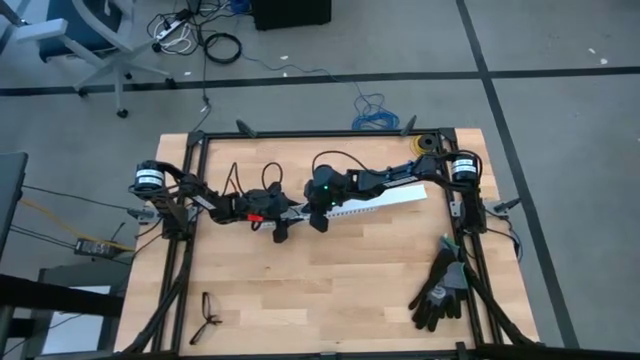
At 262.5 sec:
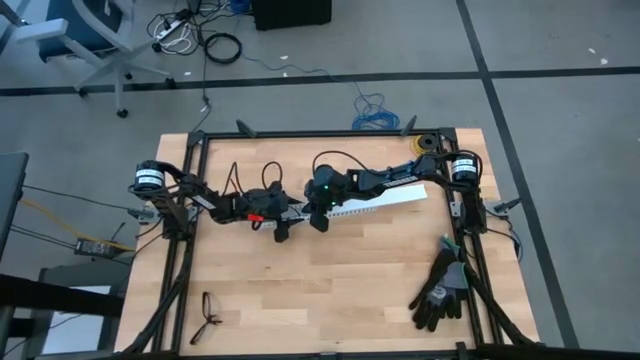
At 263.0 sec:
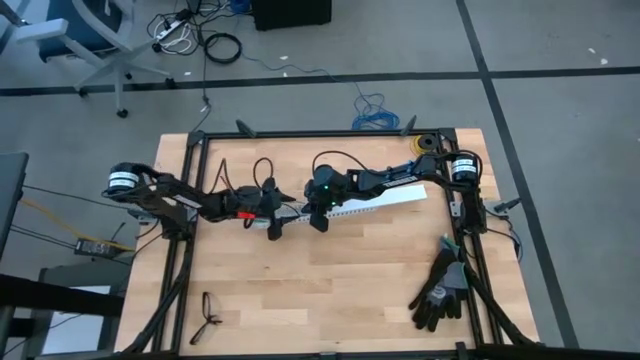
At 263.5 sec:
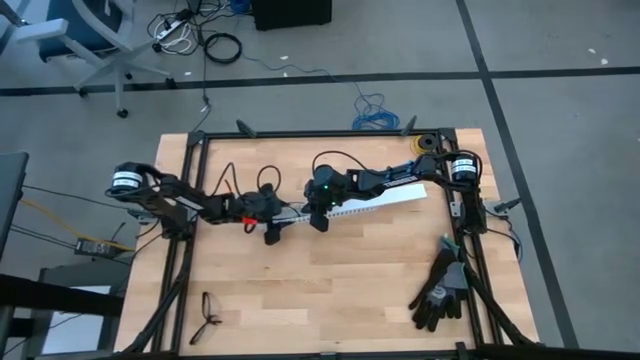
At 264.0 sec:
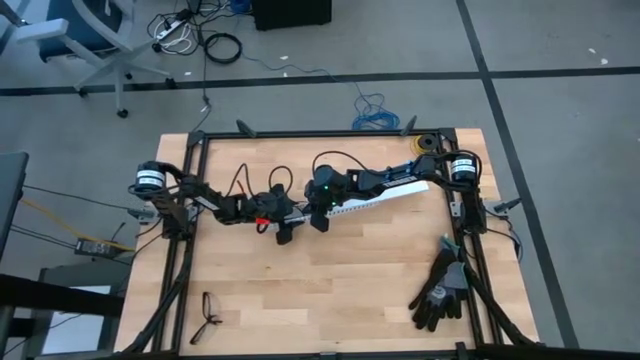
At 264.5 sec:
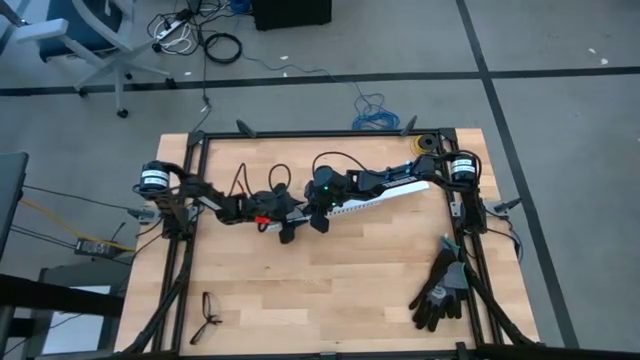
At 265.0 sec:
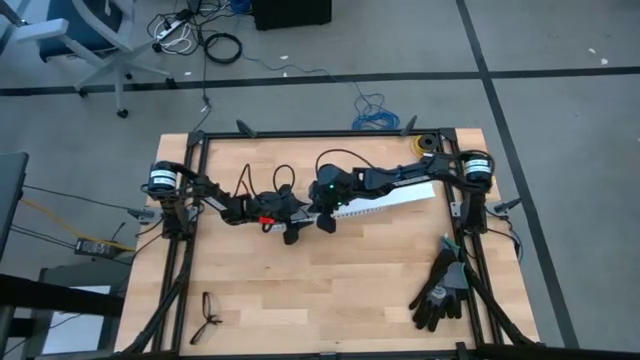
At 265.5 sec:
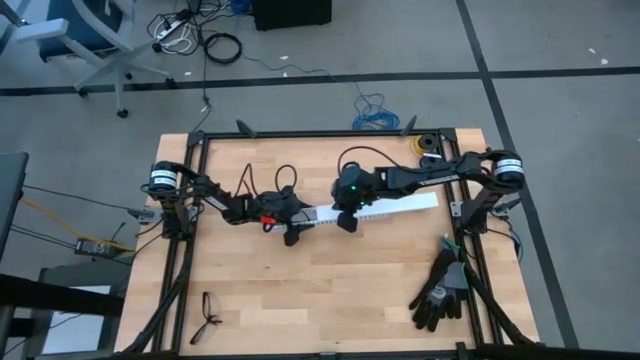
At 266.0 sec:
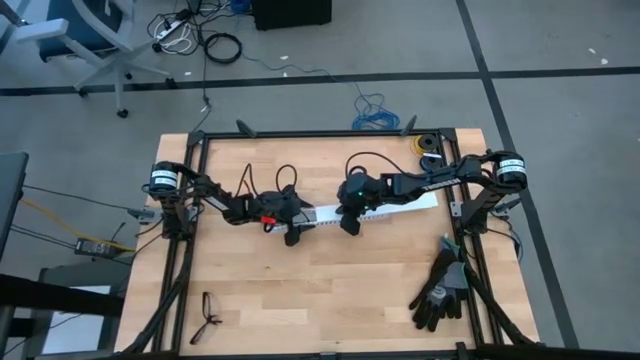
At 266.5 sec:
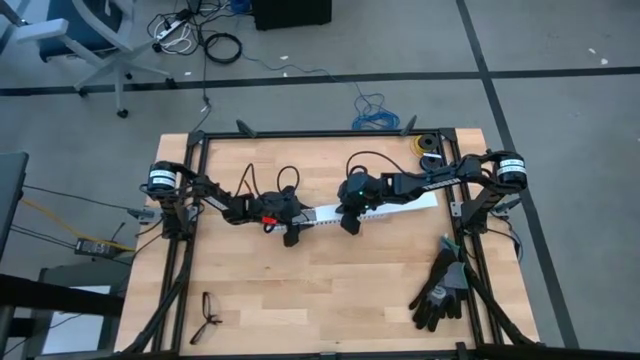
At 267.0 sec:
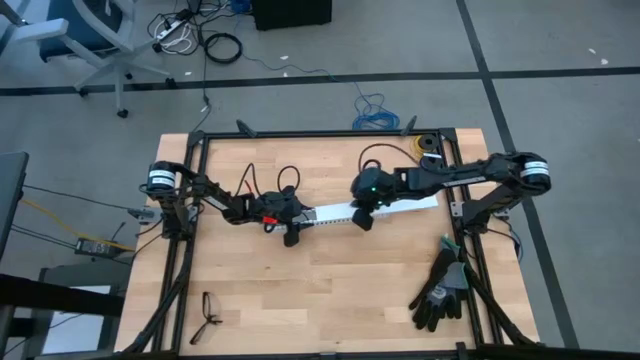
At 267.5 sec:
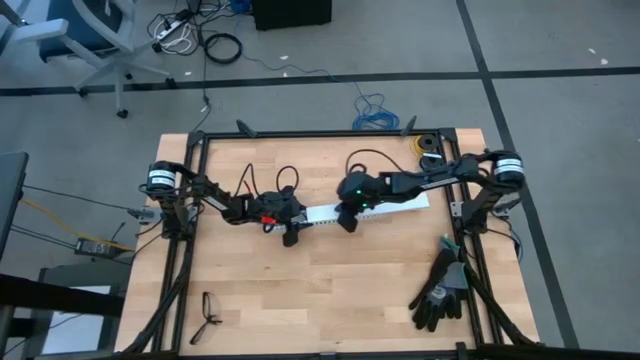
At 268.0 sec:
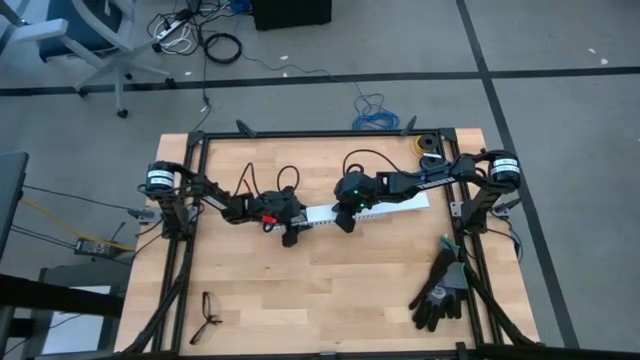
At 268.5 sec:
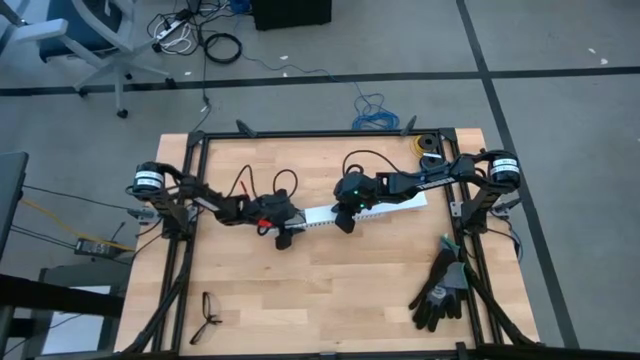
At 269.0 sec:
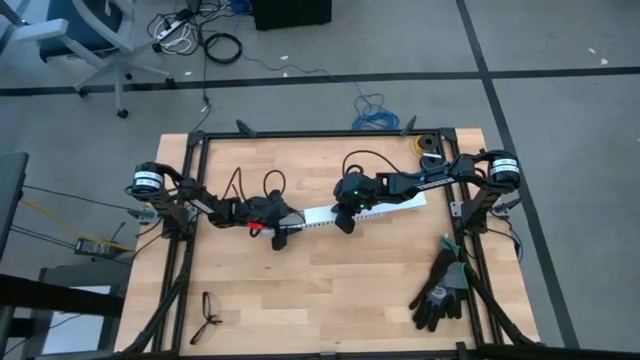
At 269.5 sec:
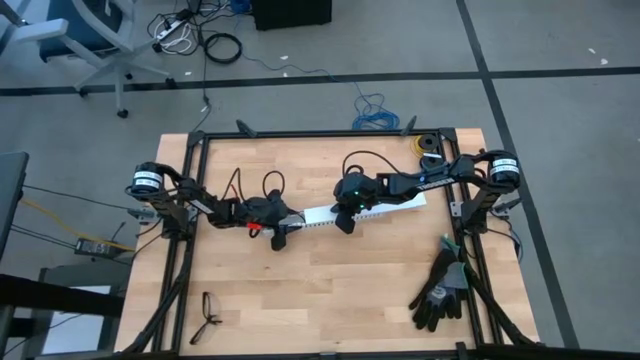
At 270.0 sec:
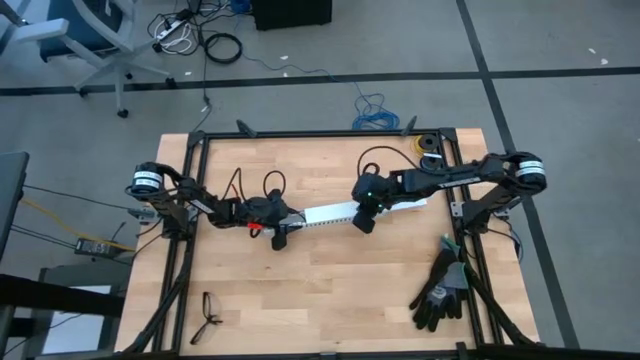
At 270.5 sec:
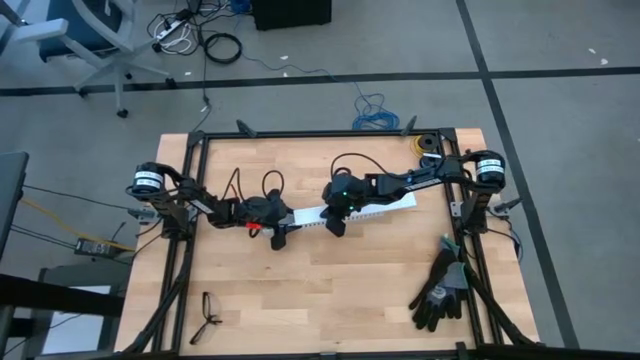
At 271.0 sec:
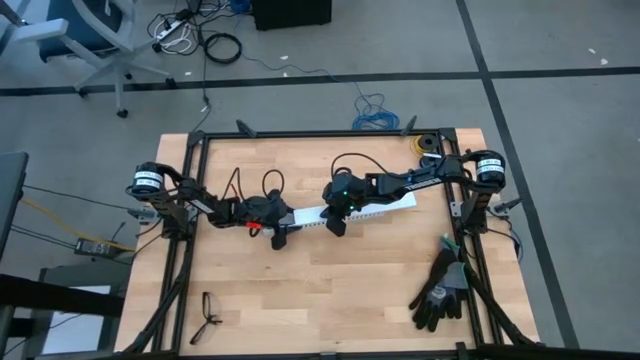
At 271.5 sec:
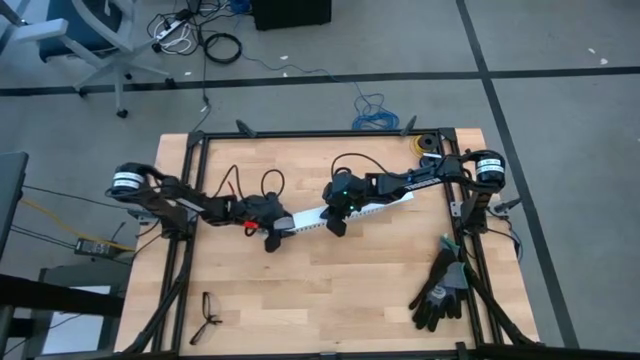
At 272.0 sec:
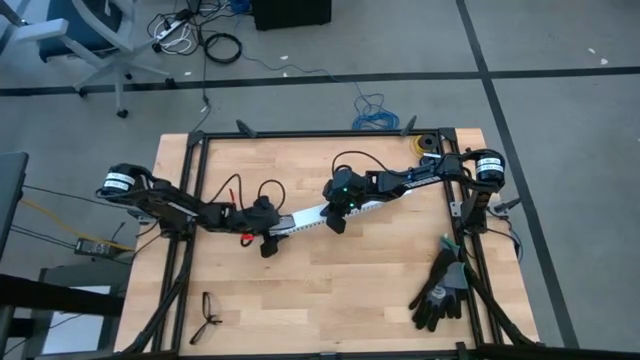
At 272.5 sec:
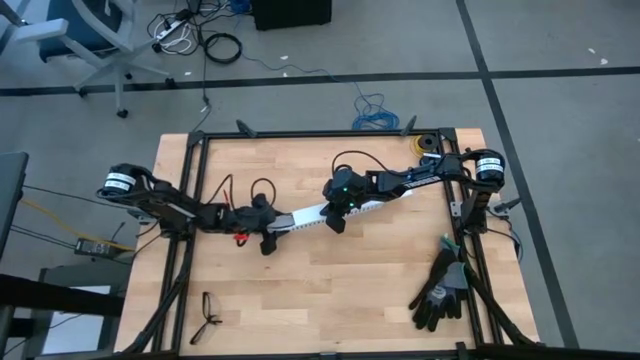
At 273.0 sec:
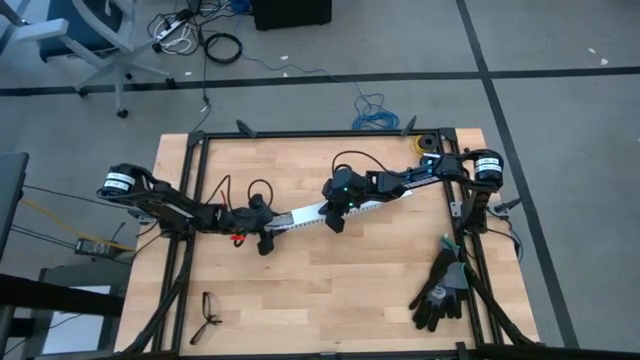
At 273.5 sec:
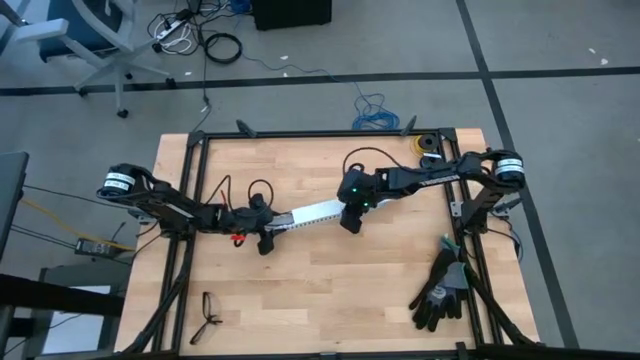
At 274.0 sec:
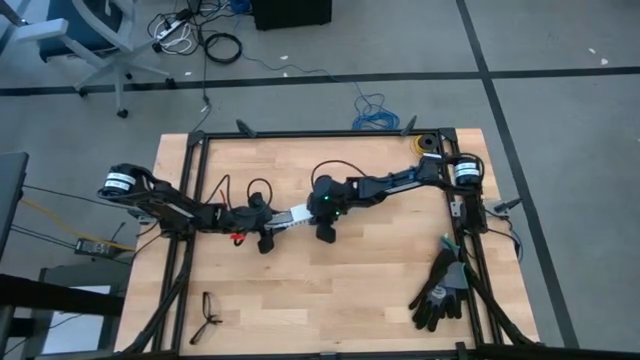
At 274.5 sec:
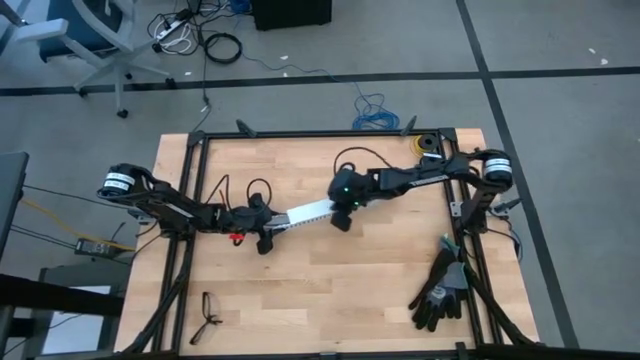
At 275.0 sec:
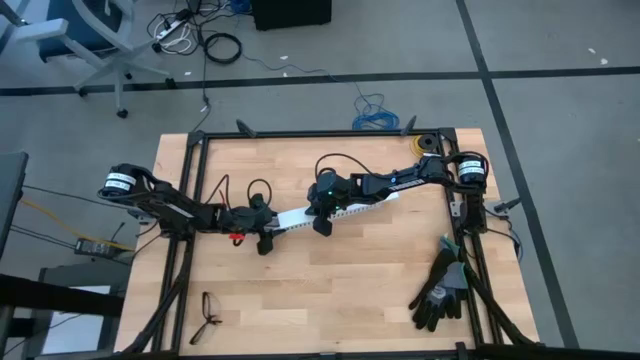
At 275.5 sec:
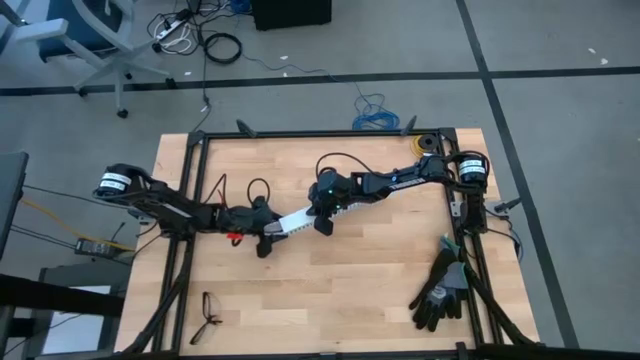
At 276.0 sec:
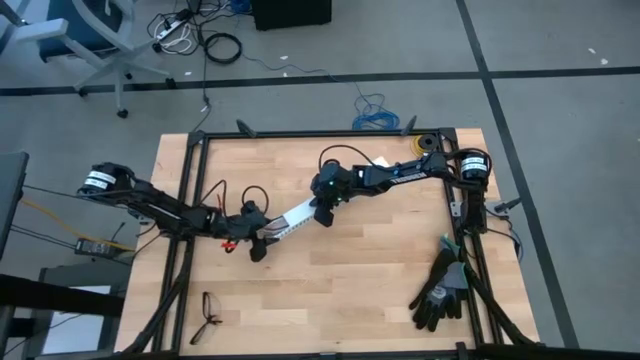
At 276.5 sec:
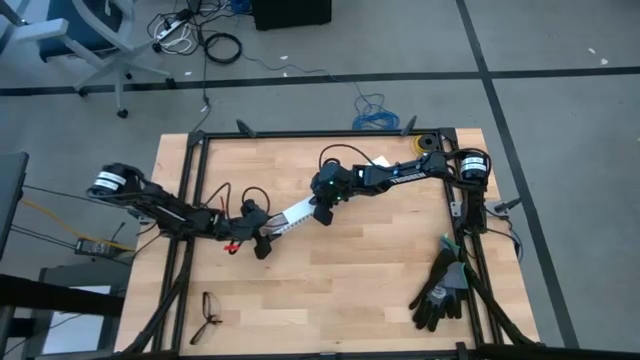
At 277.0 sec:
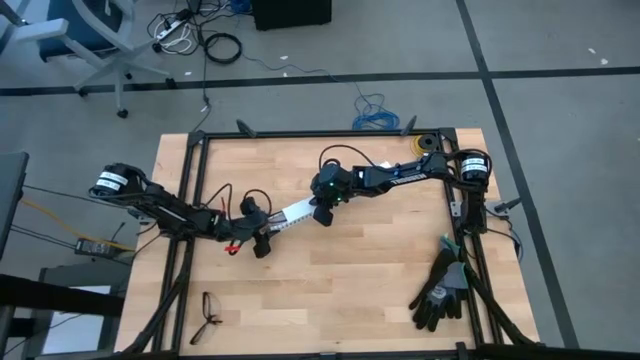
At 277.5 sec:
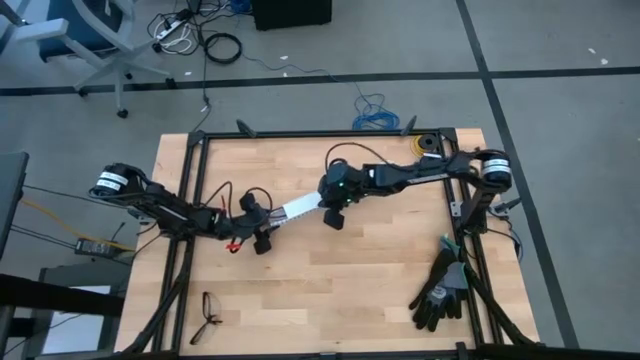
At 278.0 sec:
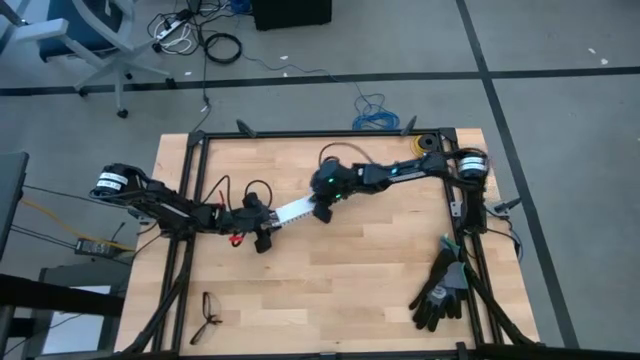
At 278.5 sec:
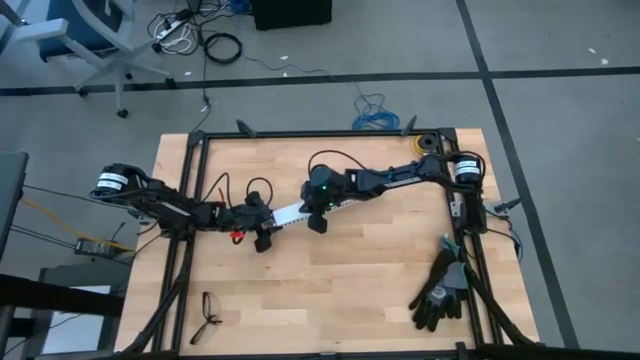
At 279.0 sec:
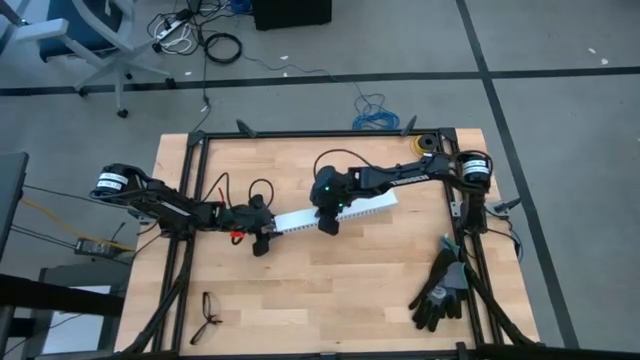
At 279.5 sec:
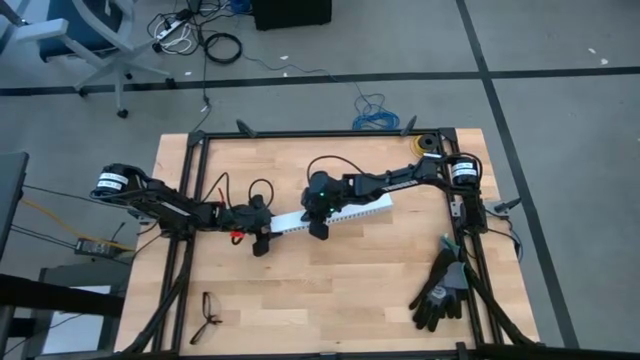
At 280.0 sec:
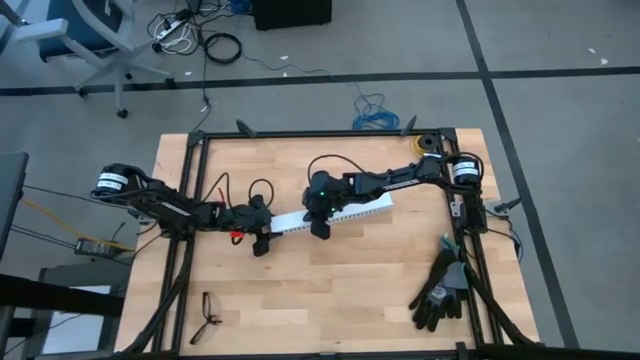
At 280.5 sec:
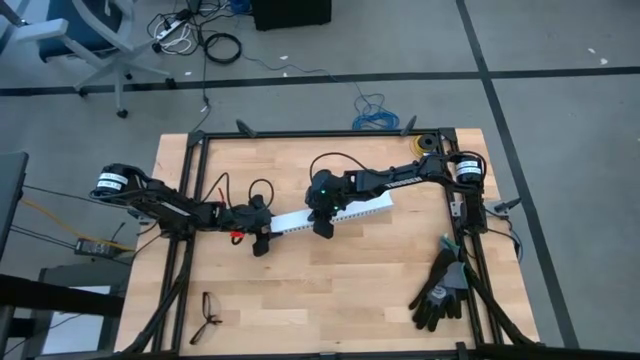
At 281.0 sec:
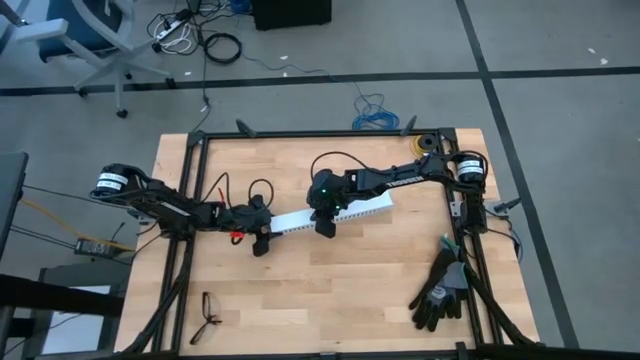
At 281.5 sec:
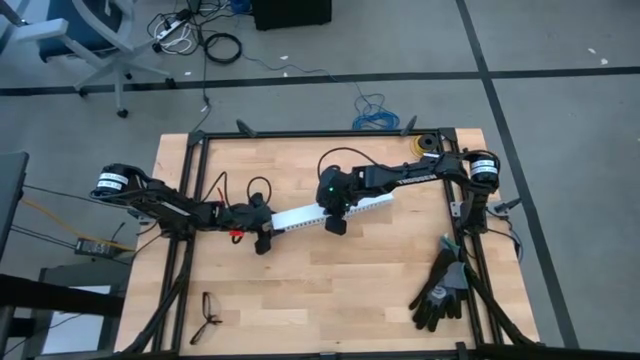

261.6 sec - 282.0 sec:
Task: Ziptie cables
Close the white cable duct with the white cable duct cover
